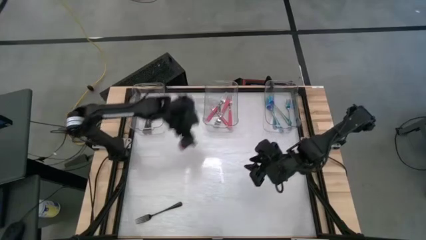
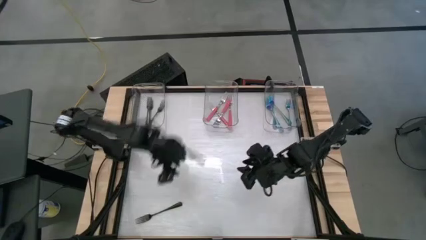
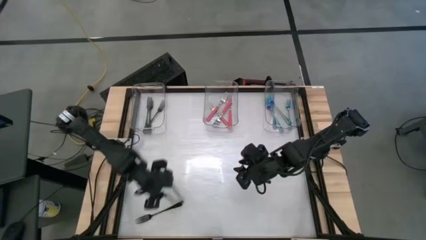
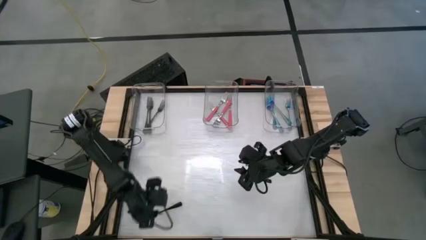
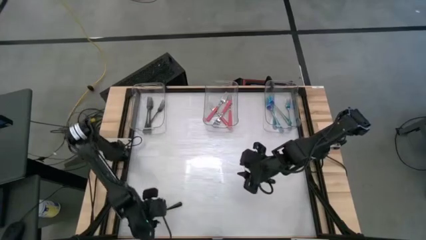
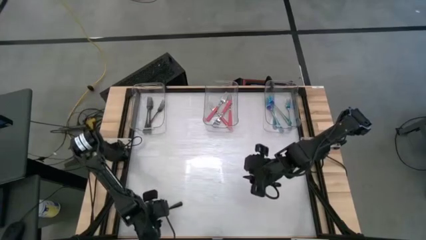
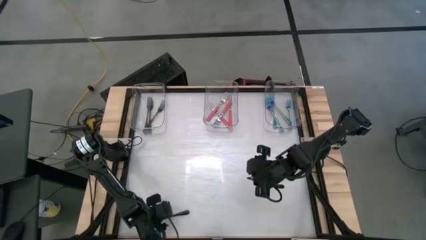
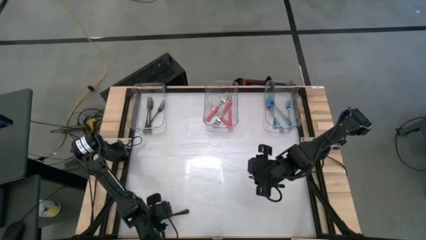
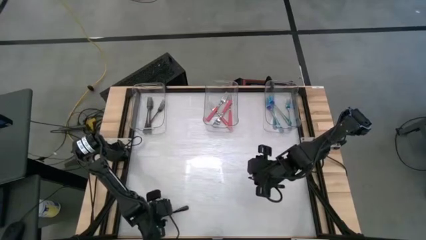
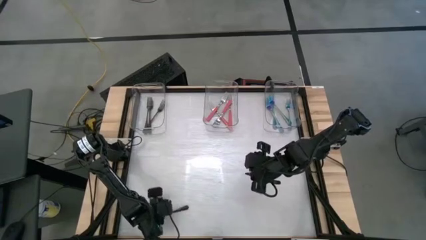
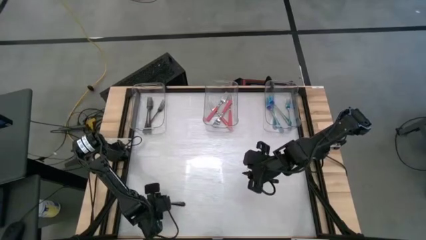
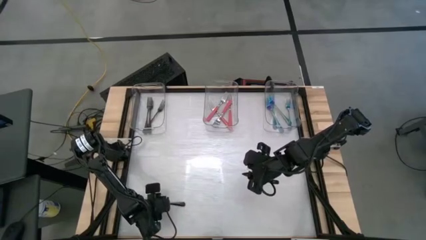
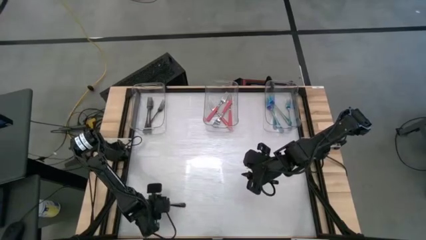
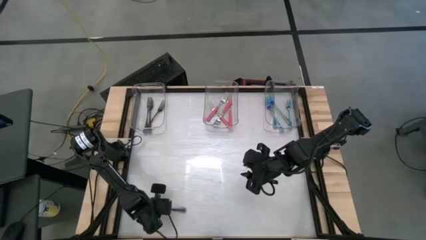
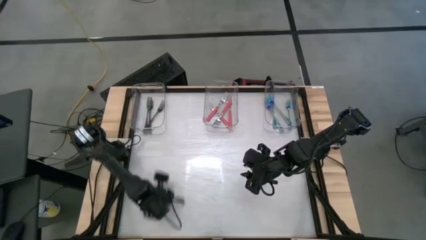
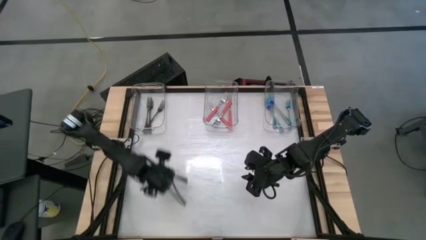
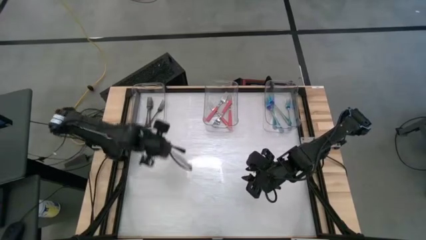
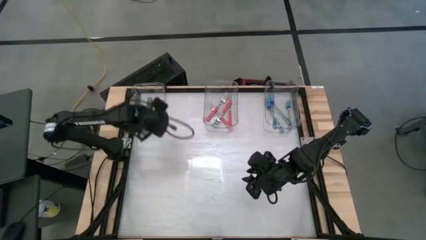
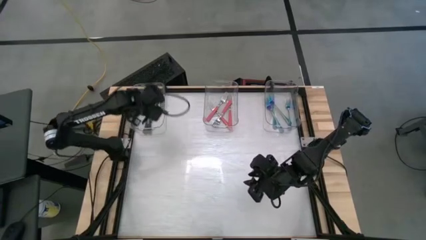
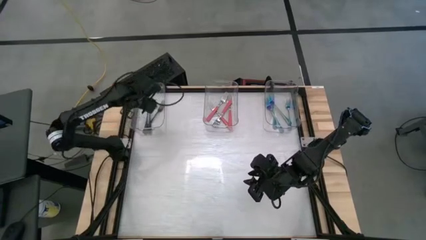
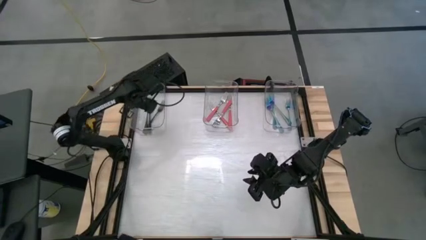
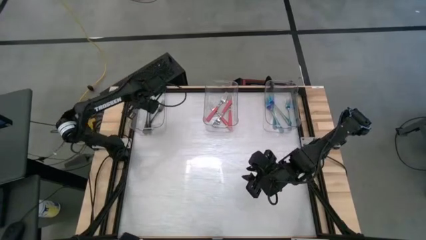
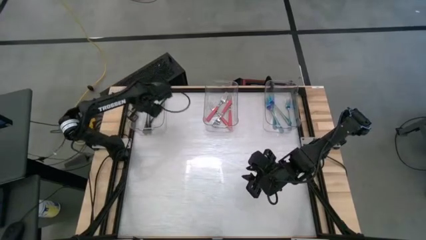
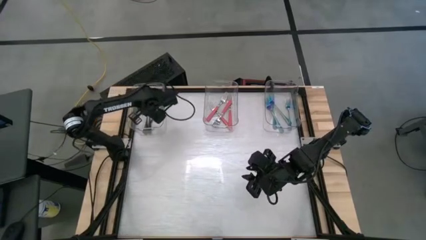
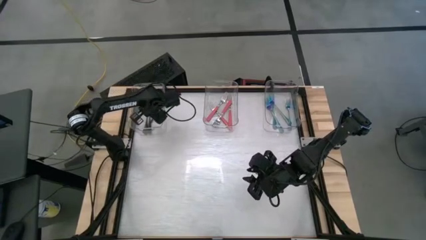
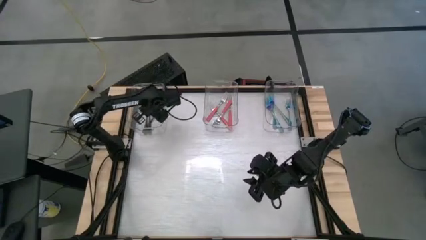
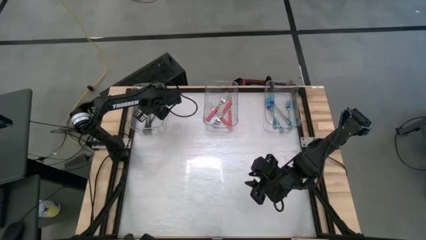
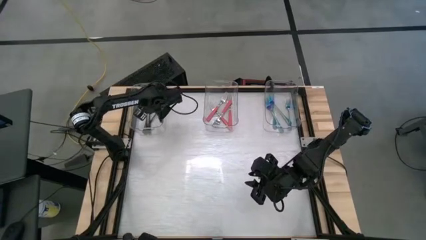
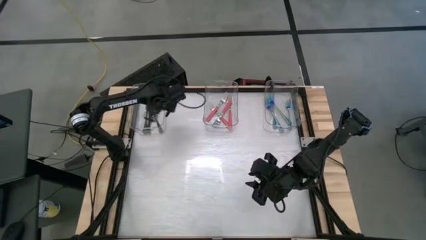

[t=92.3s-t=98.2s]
Task: Sort silverware by color (type)
Put the black fork into the left transparent bin

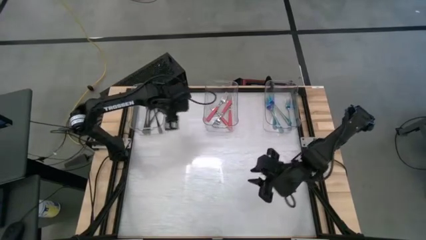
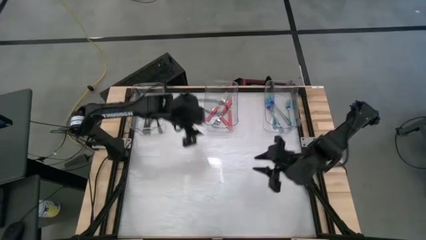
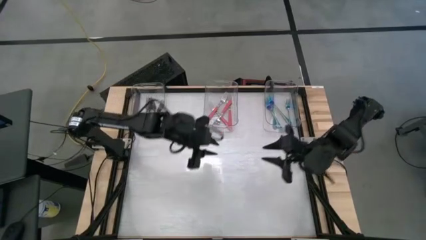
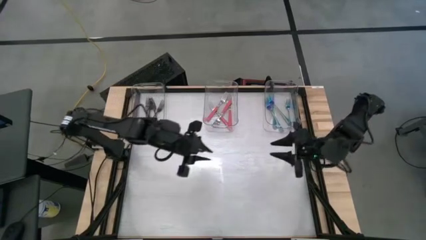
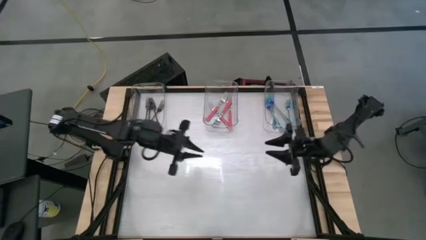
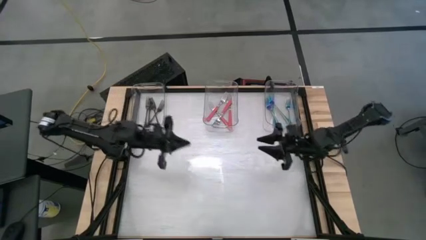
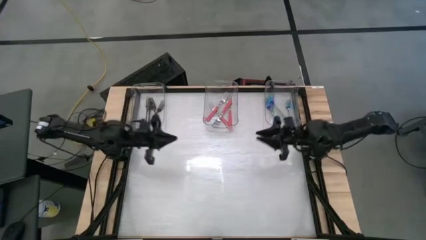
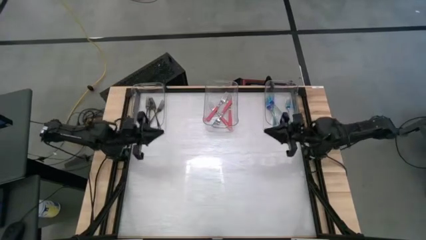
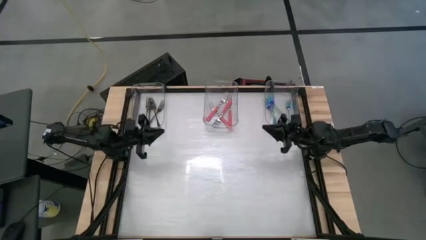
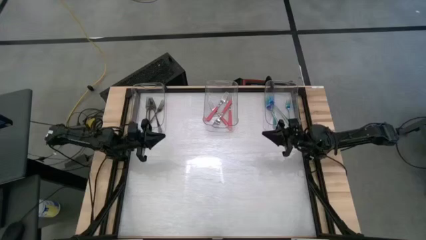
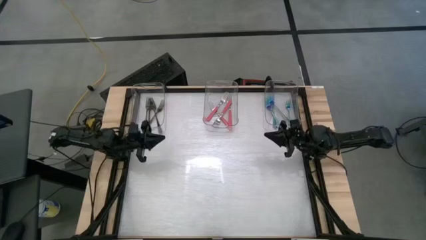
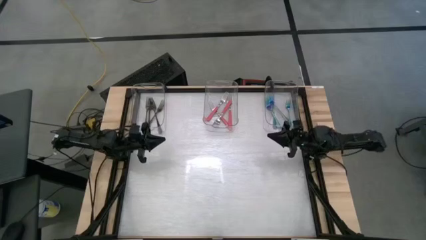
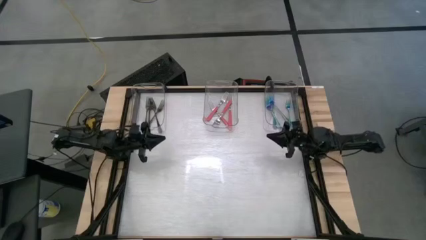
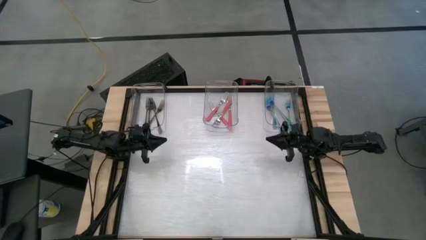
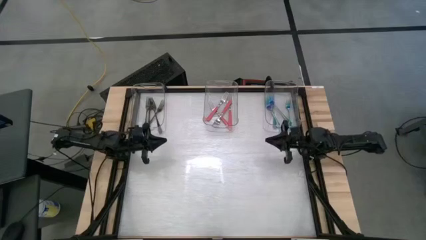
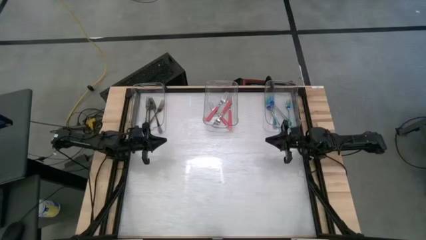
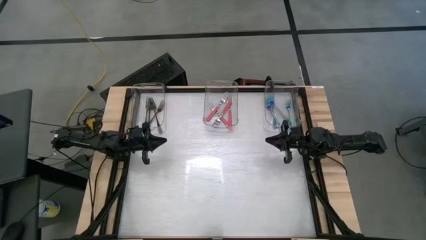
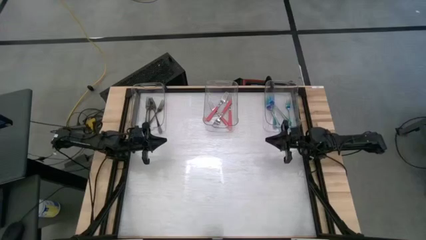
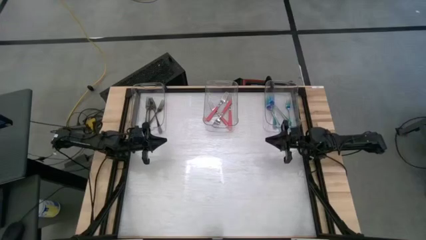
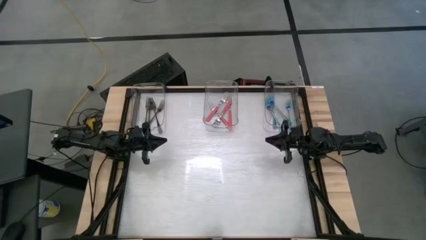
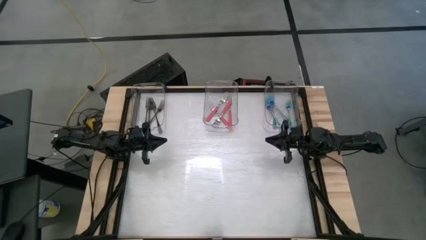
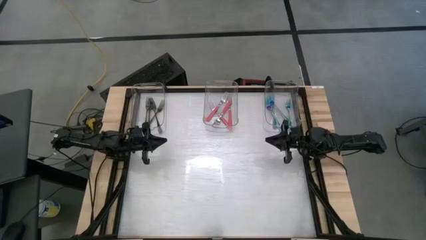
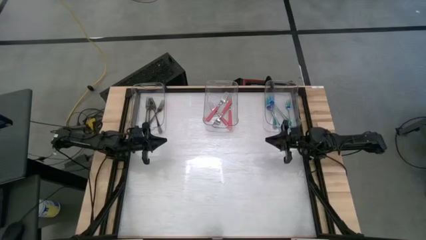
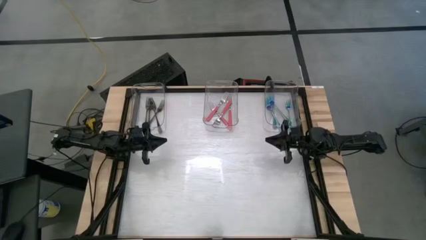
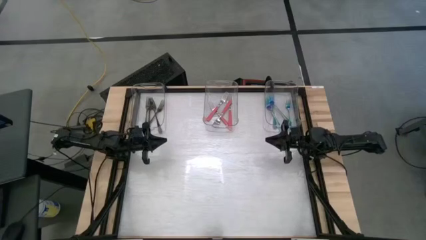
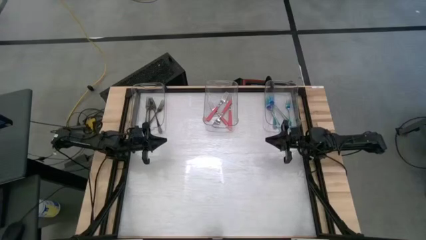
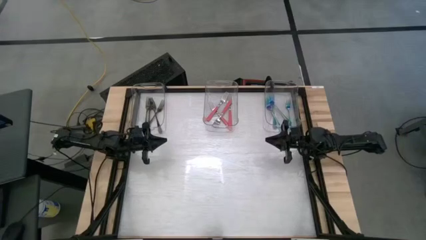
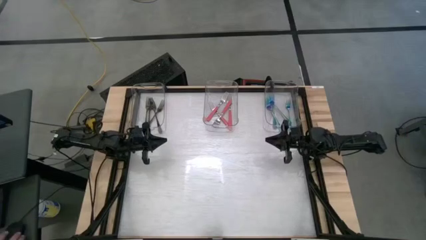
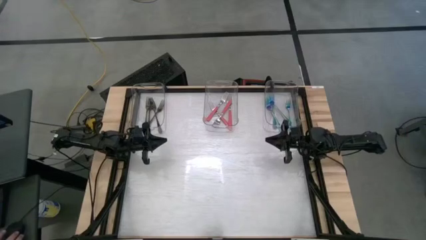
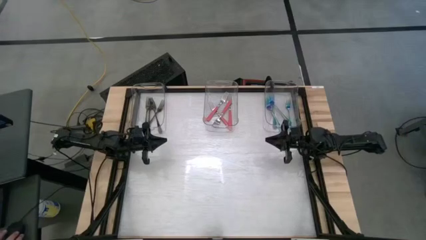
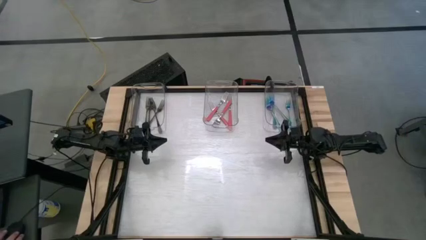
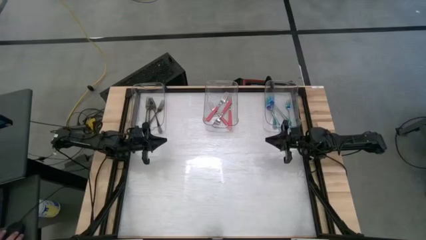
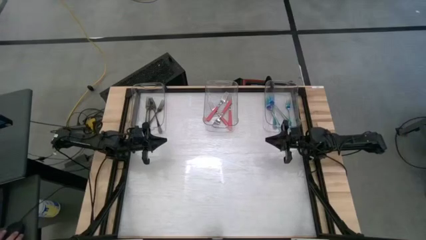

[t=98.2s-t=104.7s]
Return to Home Position

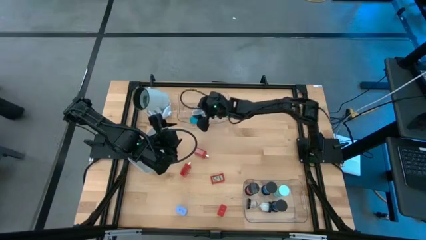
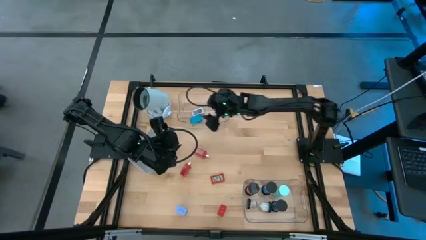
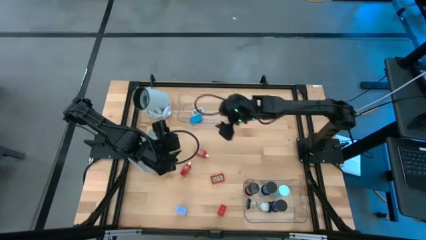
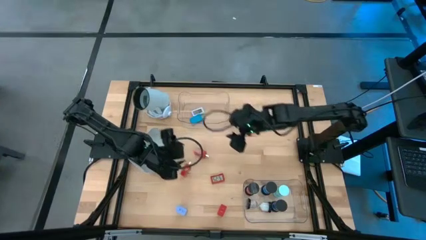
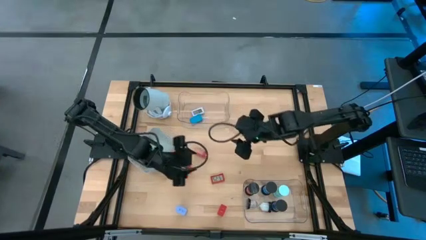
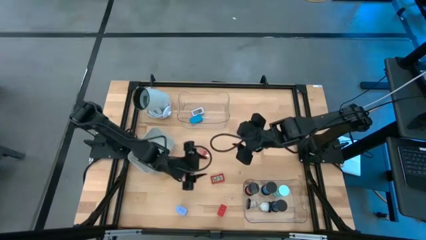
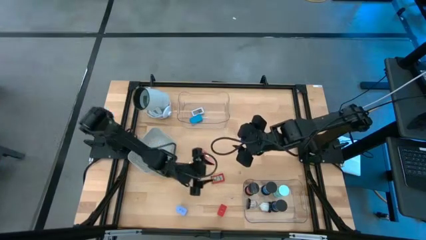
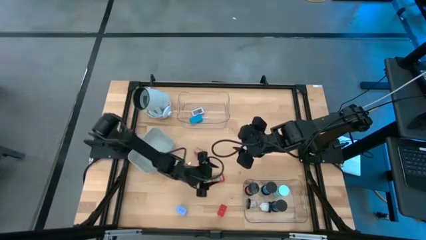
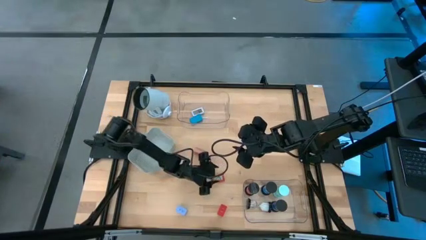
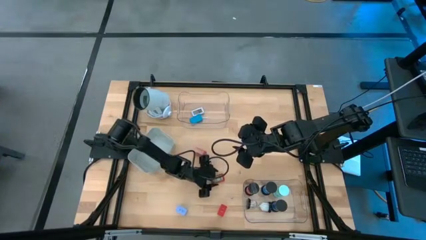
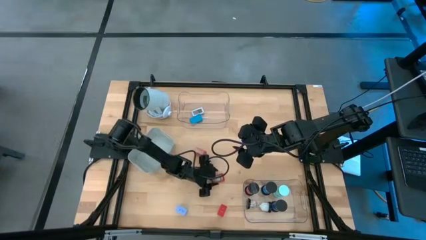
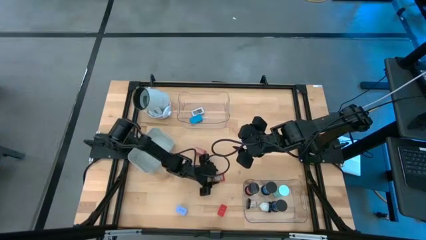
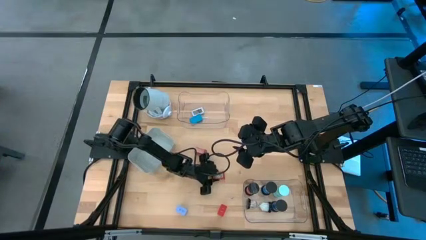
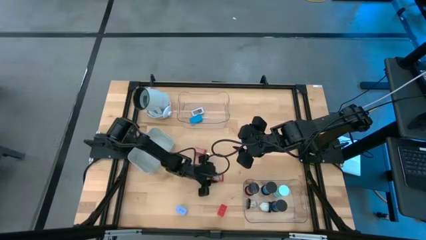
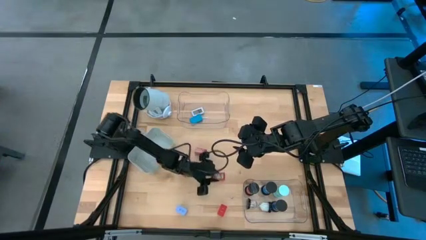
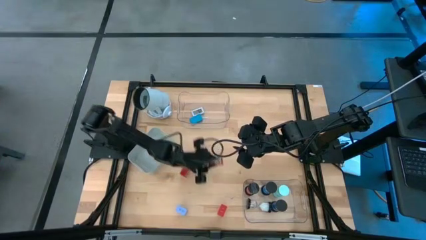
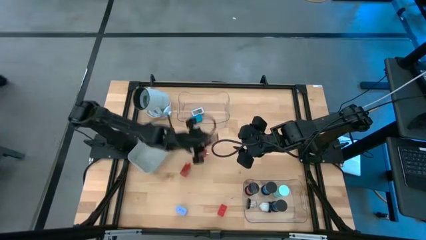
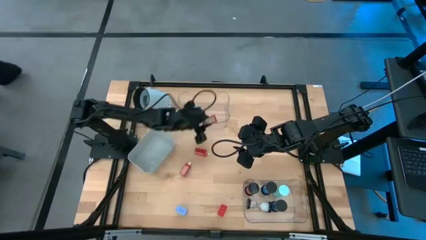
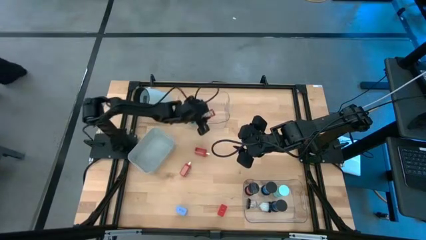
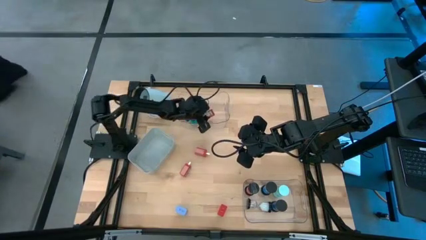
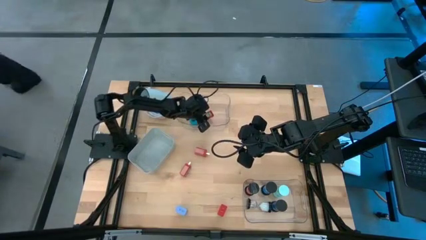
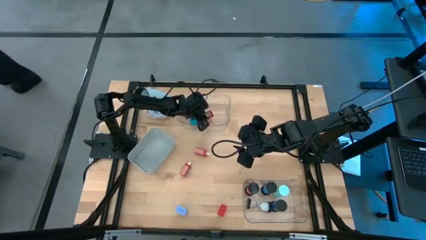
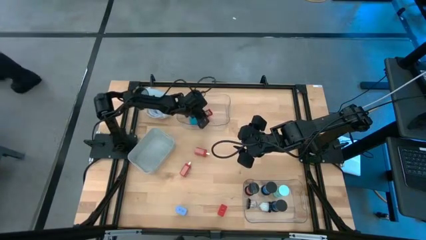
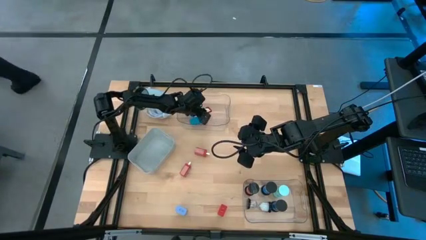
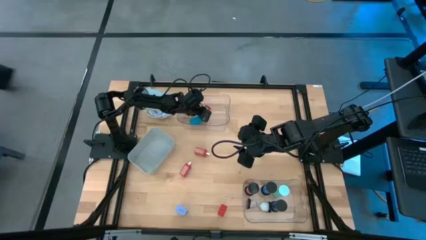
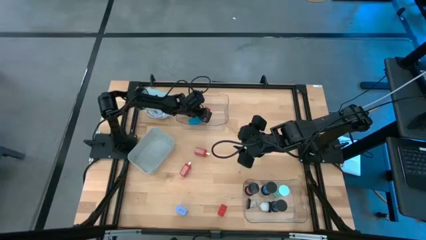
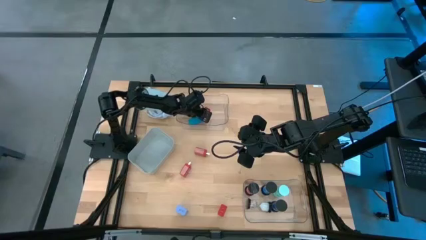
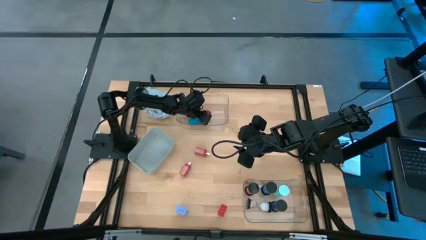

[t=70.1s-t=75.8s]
Task: Pick & Place Office items
Put the top orange digital clock into the top transparent bin
